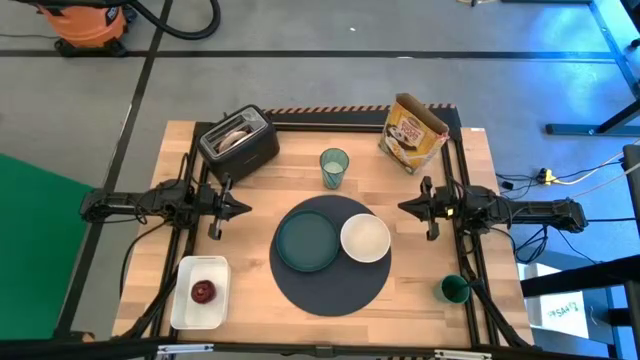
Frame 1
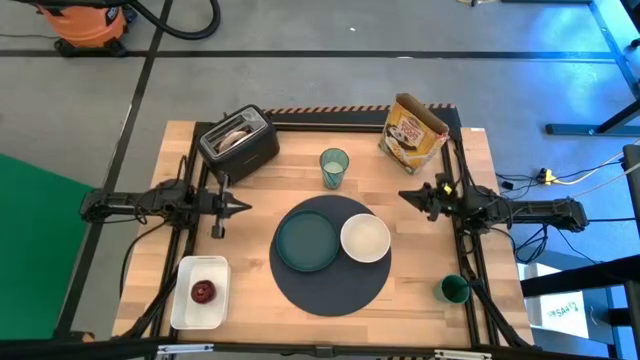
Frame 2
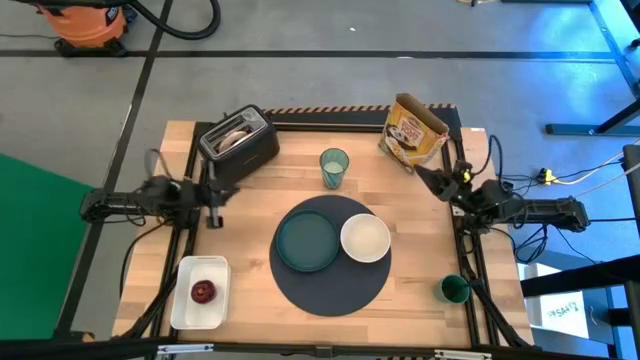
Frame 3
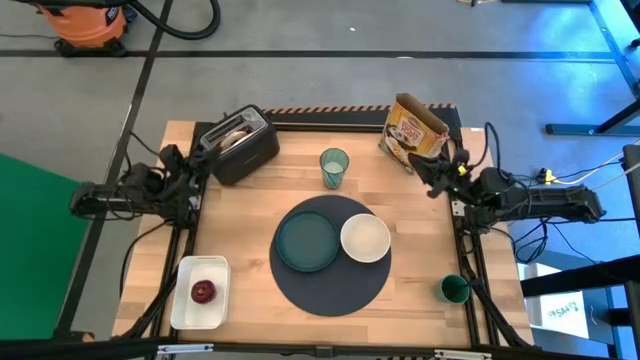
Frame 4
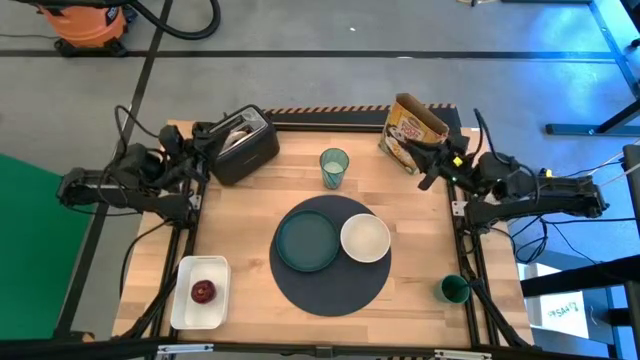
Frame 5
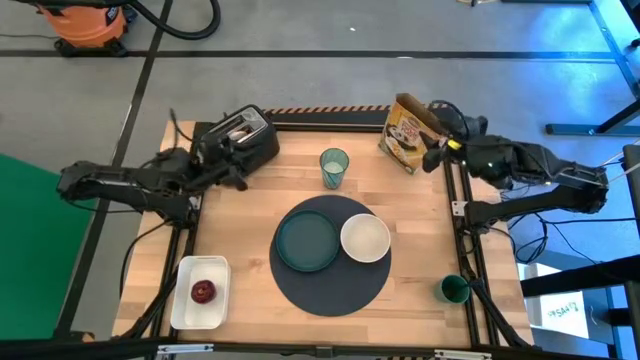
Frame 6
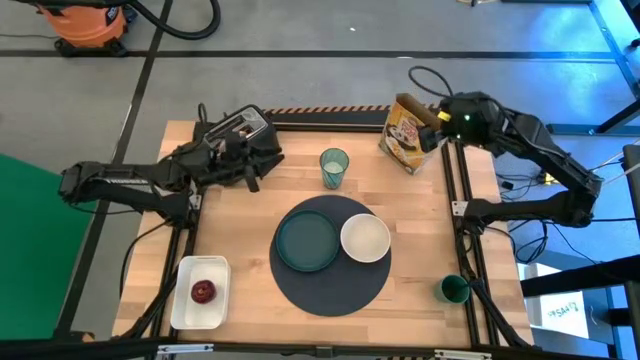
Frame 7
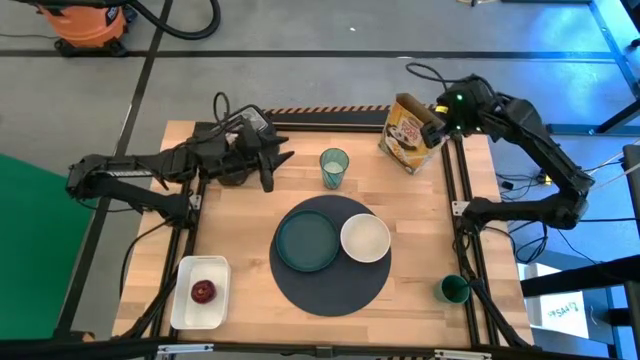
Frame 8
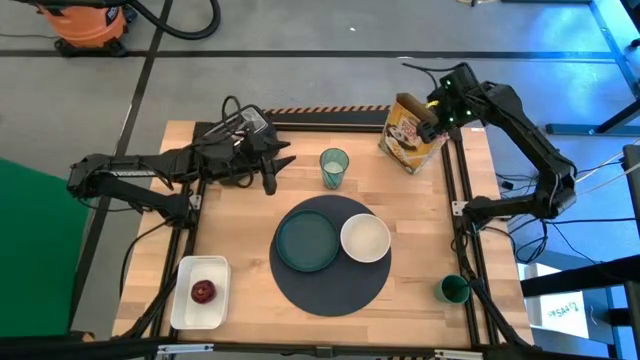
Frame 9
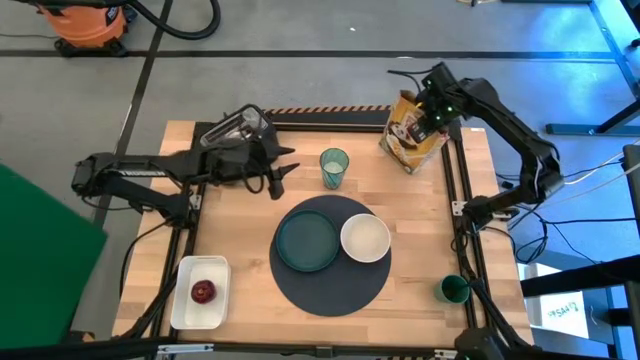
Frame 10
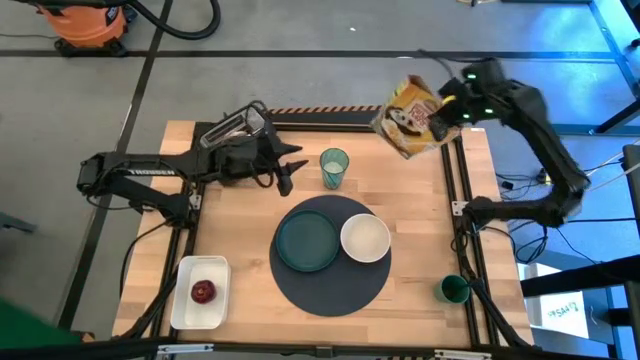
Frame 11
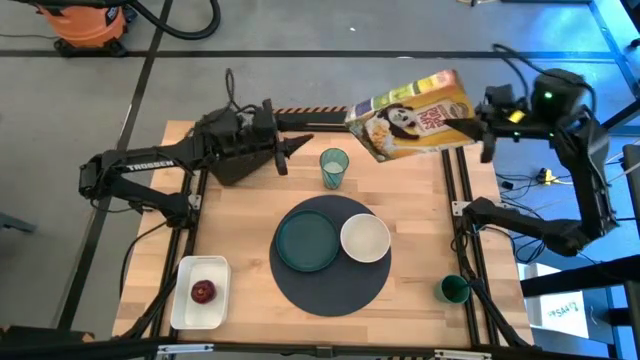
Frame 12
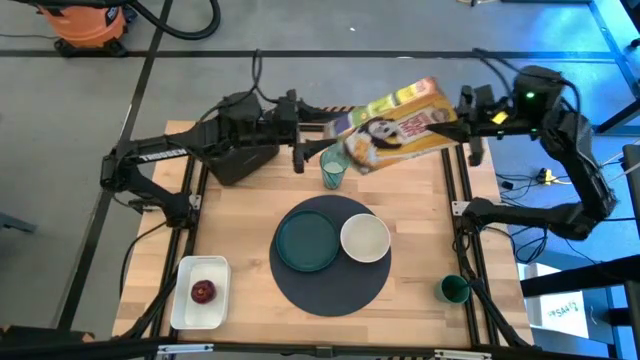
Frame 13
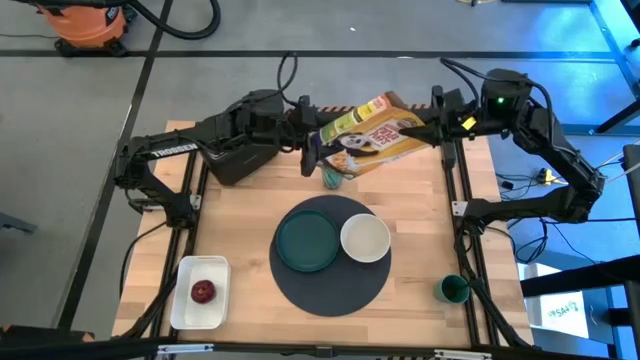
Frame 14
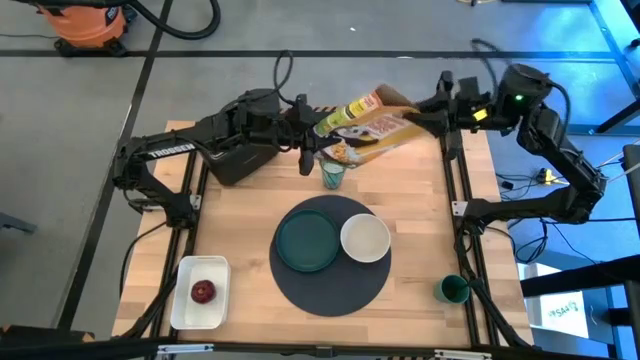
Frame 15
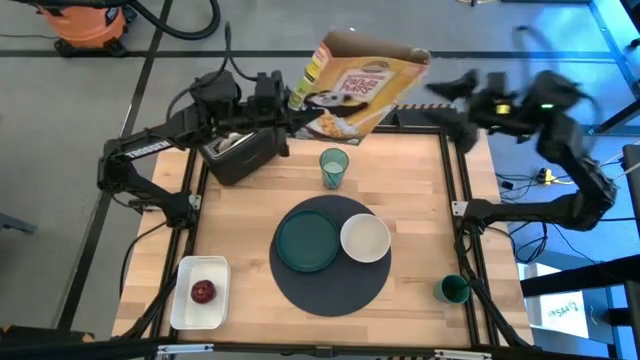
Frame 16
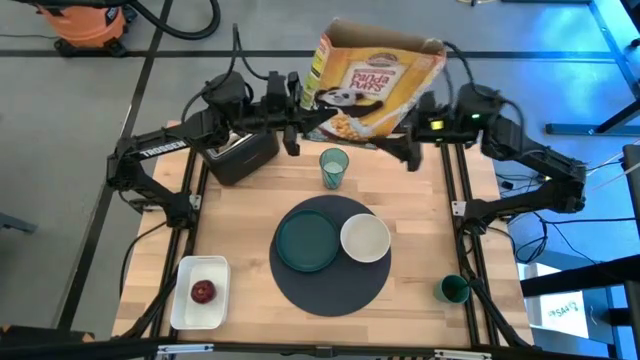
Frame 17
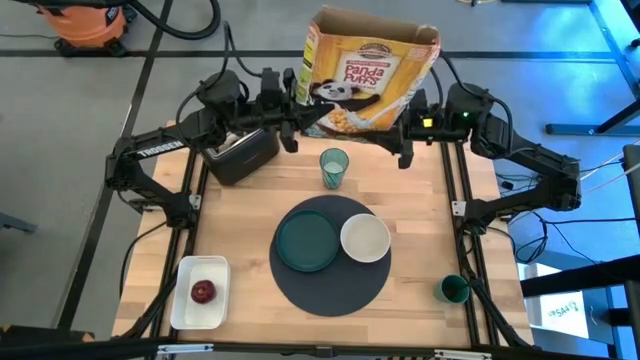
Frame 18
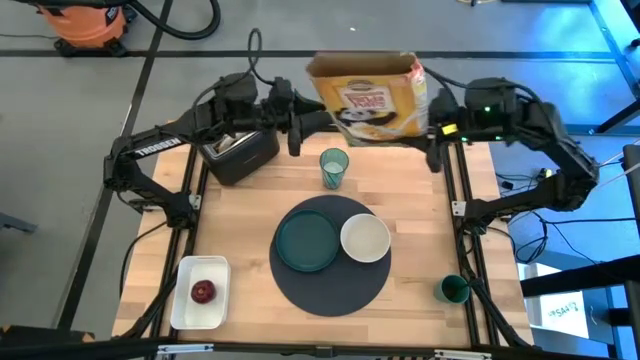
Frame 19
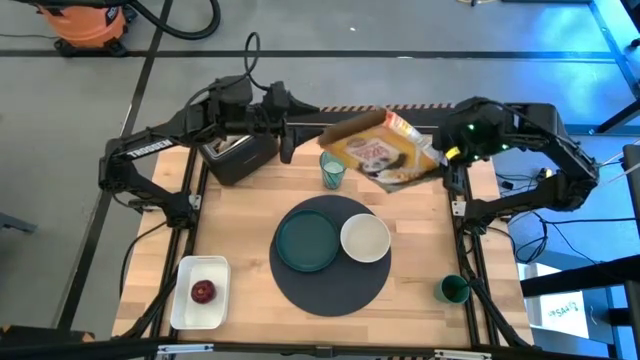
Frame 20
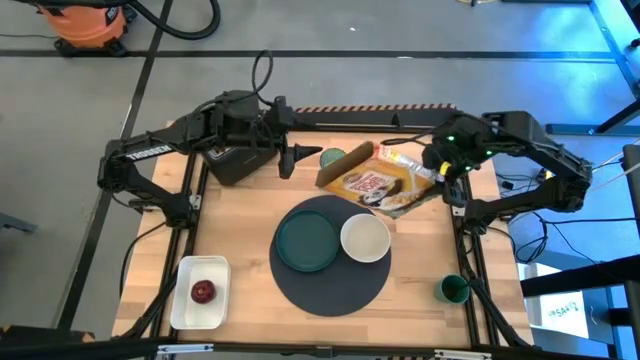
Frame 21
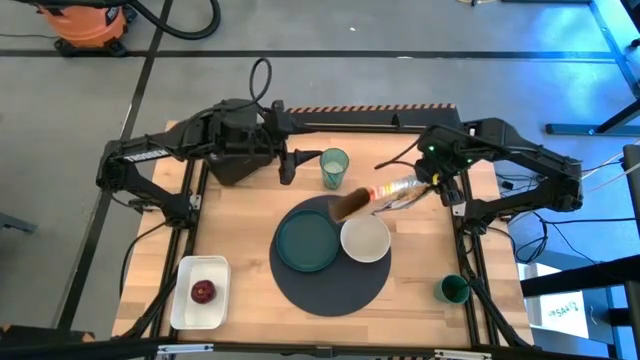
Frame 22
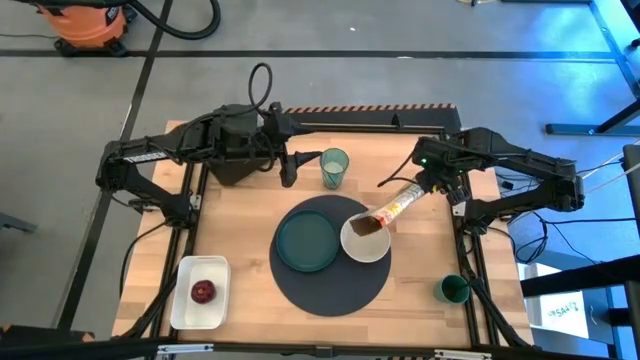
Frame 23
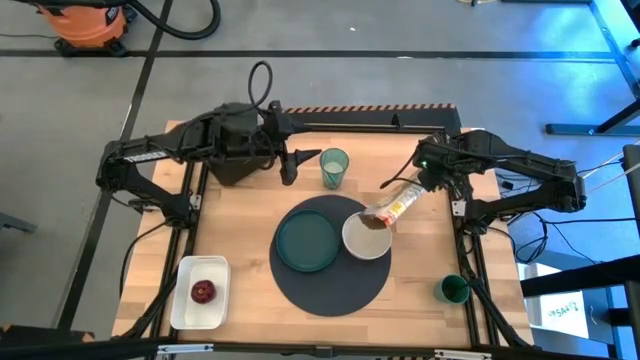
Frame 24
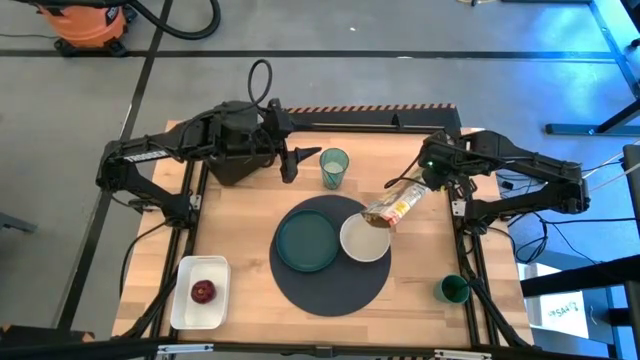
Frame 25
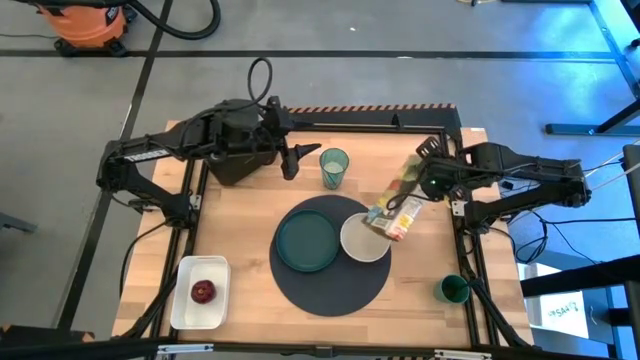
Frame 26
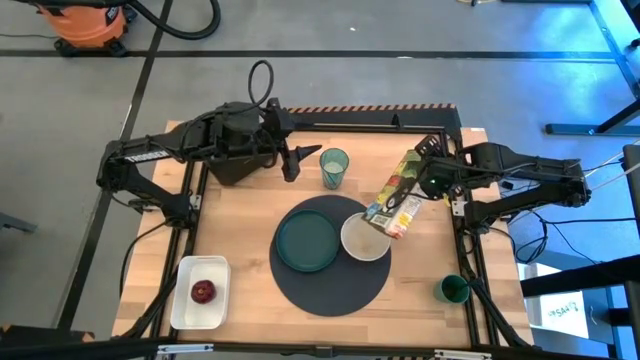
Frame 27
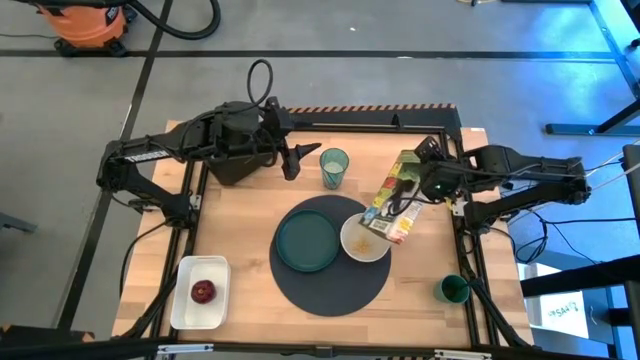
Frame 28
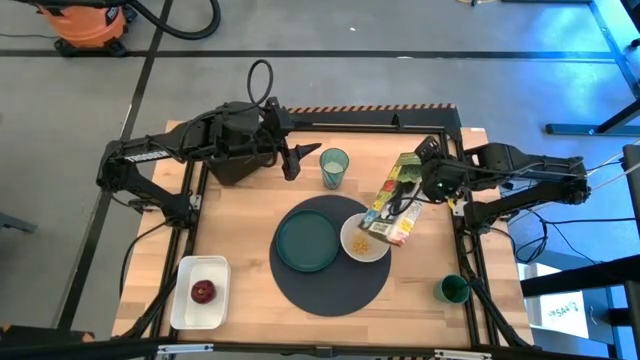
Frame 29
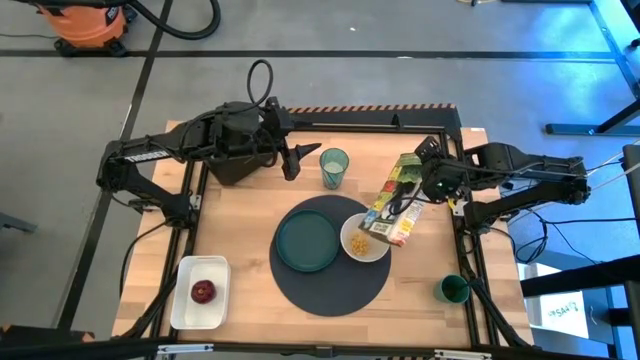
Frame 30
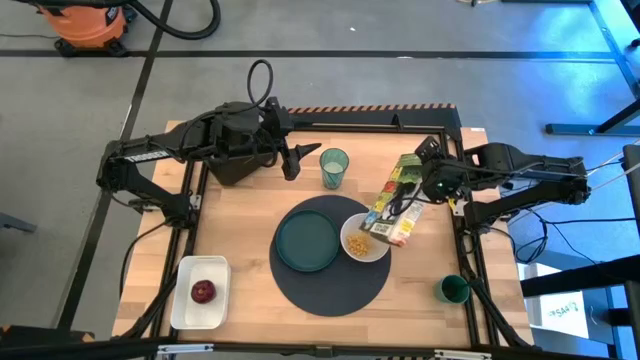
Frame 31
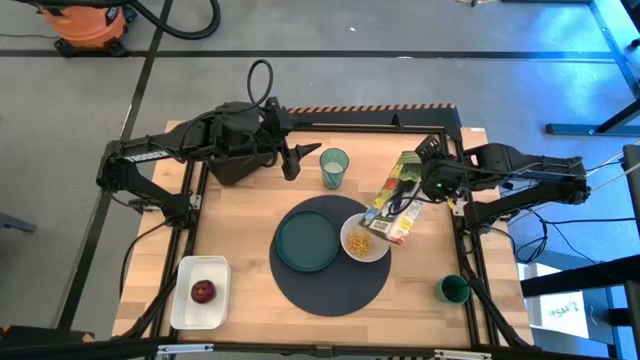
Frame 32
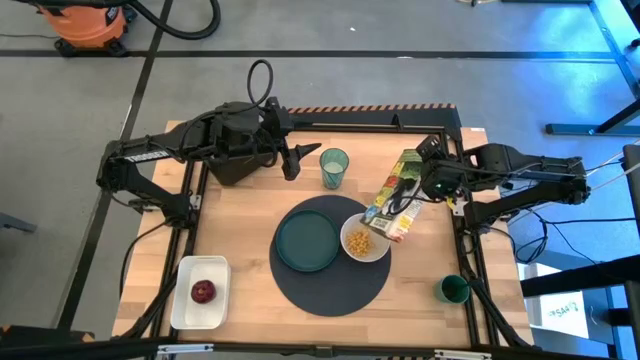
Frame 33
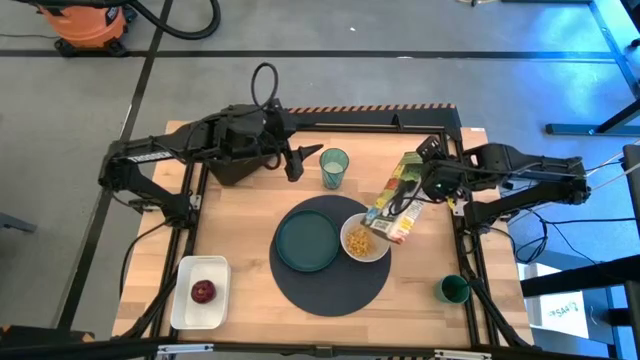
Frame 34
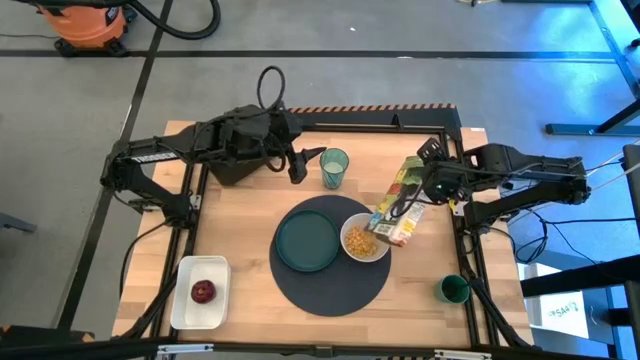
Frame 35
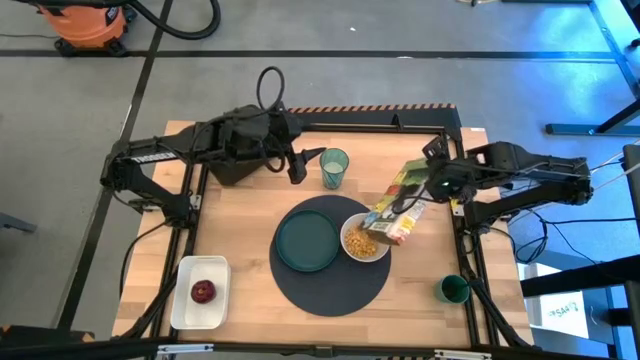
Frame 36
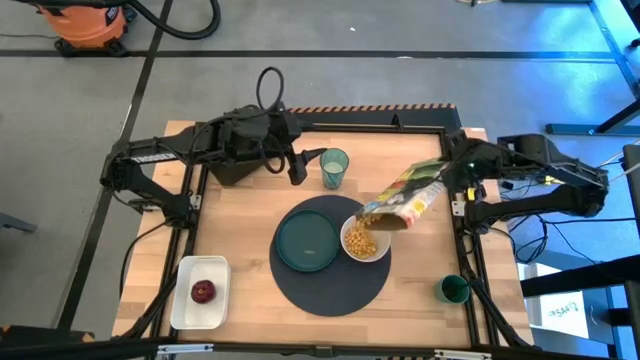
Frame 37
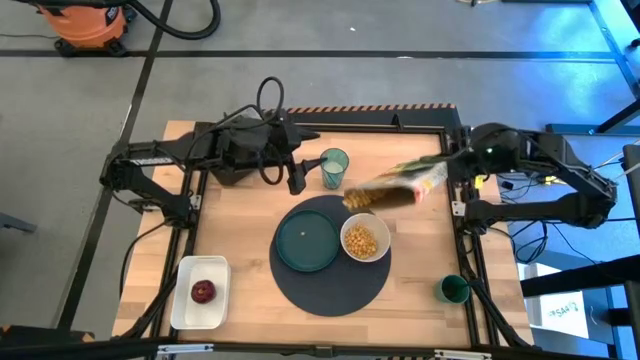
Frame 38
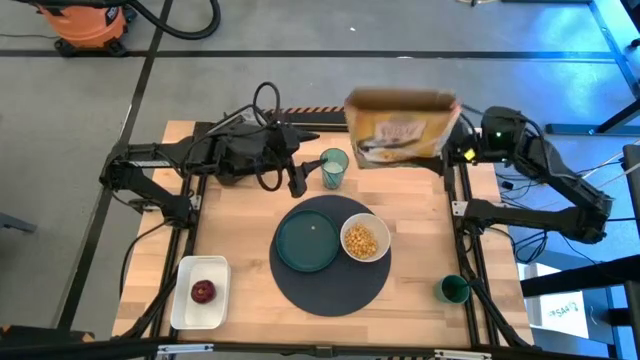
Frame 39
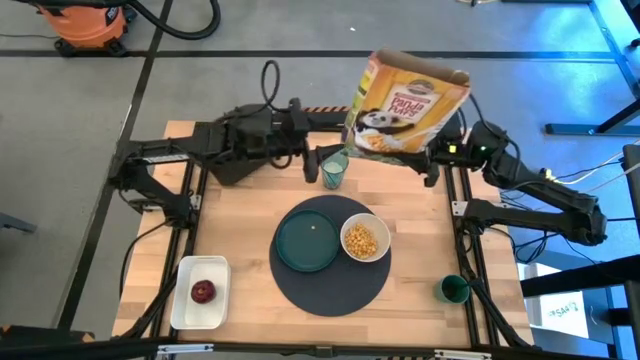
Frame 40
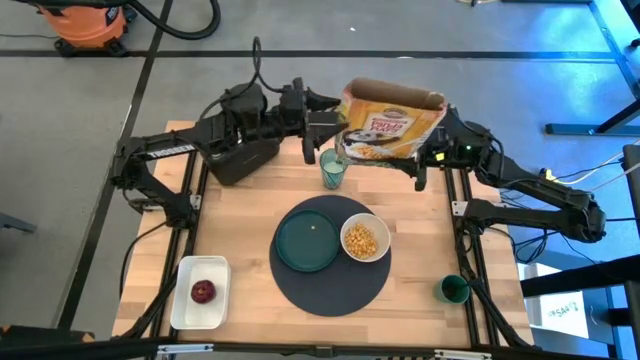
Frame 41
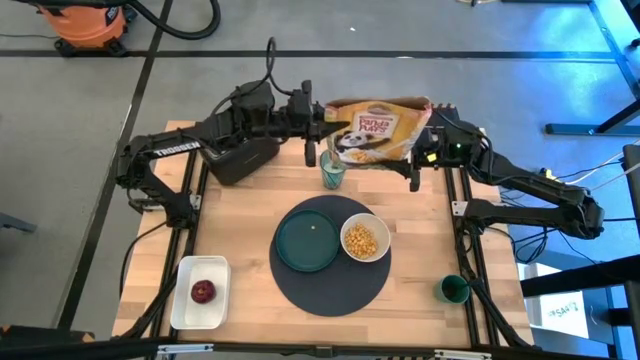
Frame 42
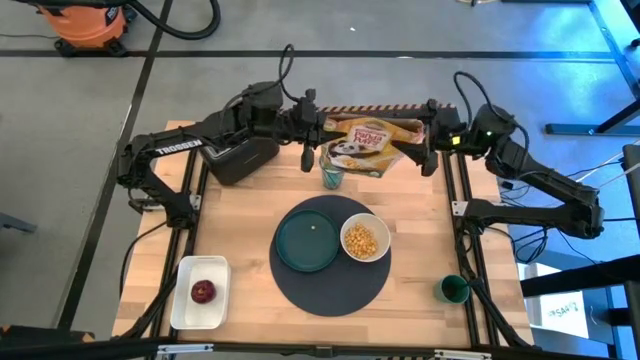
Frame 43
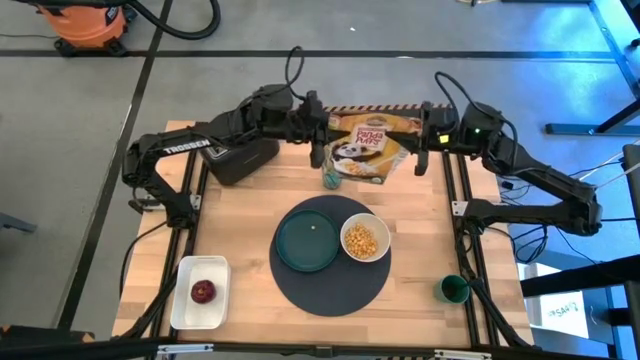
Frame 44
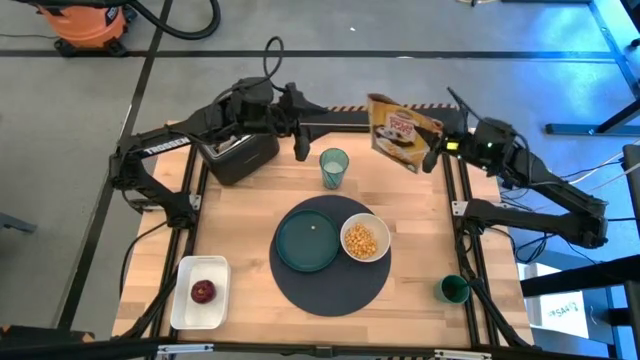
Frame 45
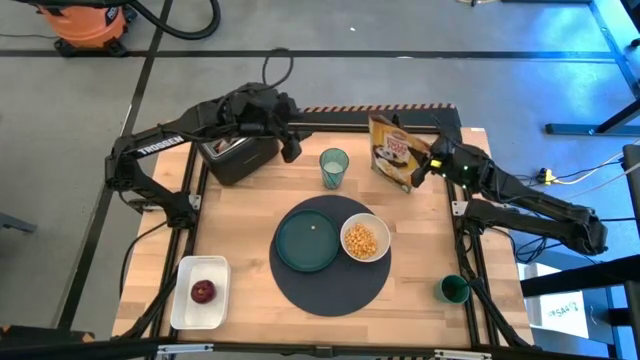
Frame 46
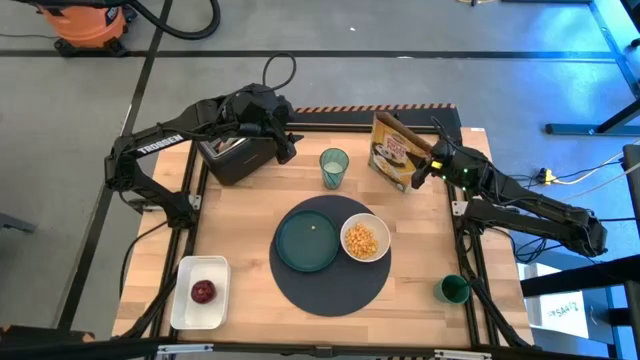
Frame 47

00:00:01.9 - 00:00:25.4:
Task: Arrange a breakfast setting
Pour the cereal from the cereal box into the white bowl
